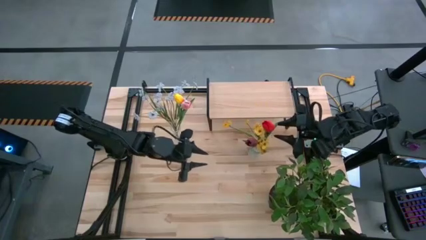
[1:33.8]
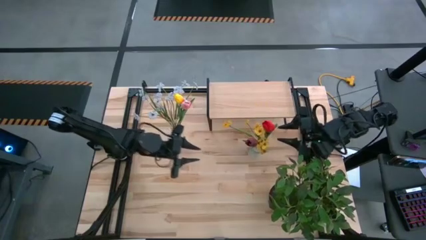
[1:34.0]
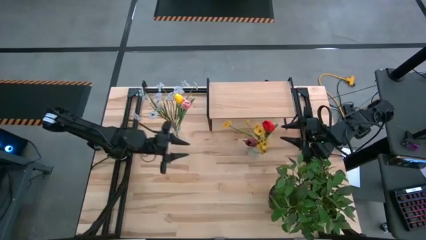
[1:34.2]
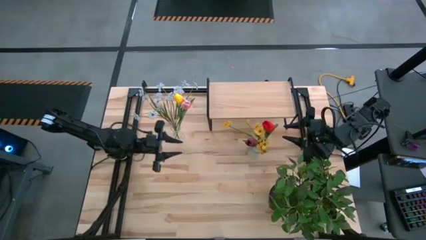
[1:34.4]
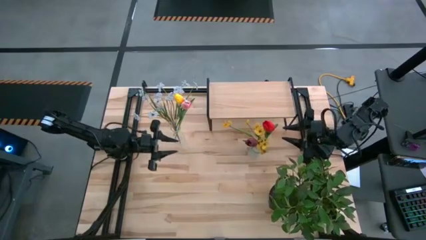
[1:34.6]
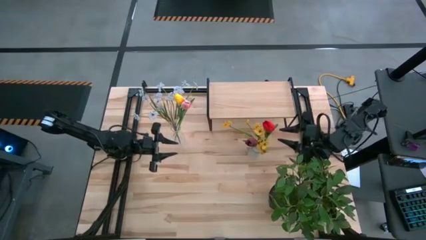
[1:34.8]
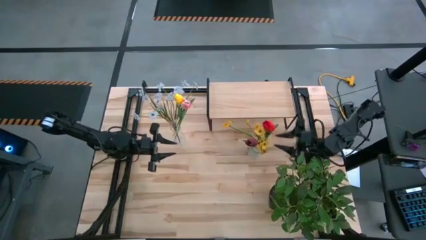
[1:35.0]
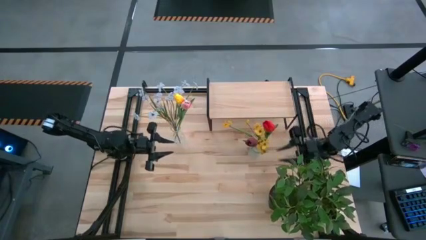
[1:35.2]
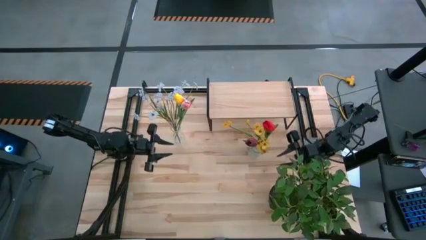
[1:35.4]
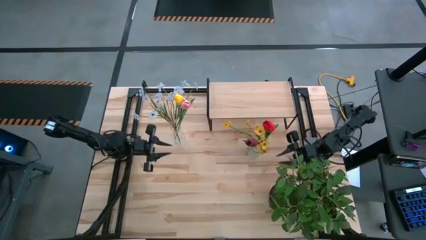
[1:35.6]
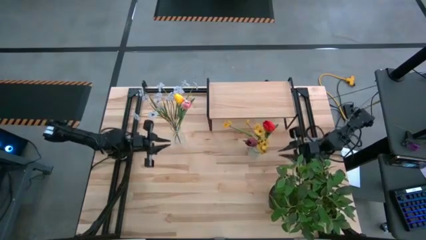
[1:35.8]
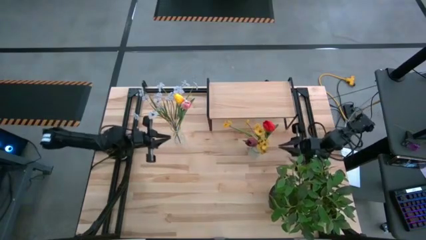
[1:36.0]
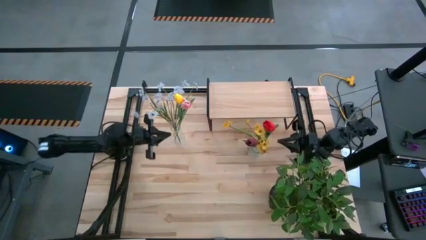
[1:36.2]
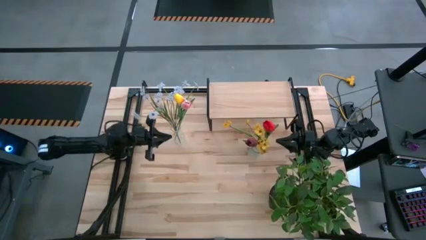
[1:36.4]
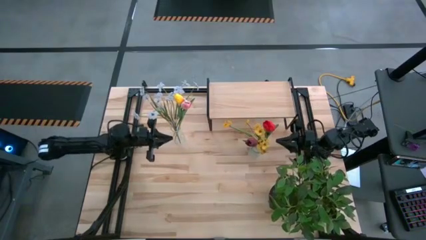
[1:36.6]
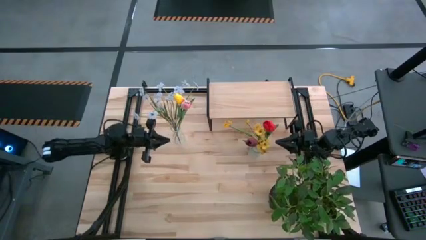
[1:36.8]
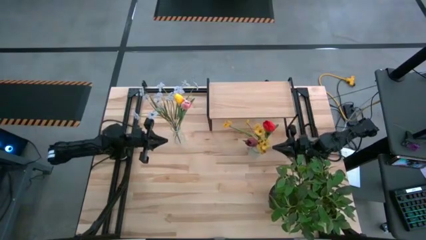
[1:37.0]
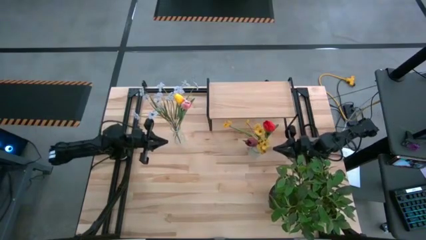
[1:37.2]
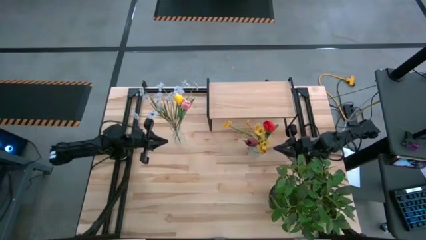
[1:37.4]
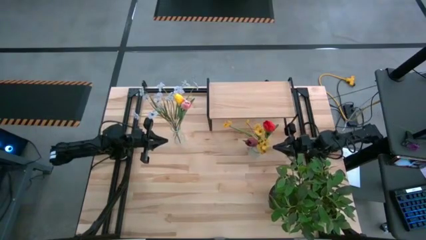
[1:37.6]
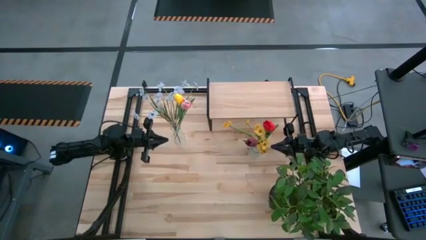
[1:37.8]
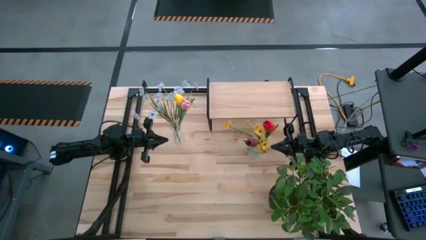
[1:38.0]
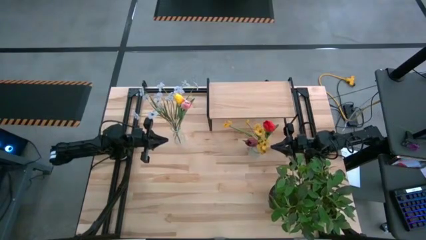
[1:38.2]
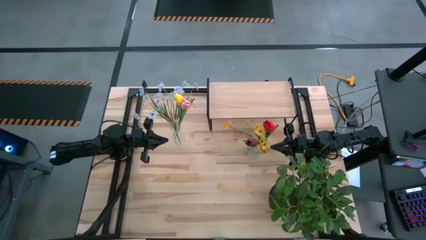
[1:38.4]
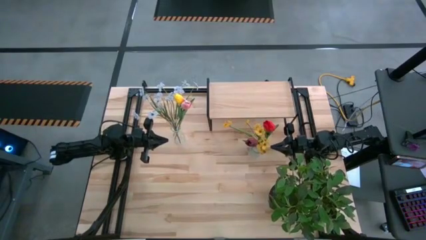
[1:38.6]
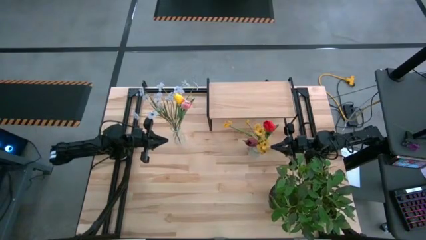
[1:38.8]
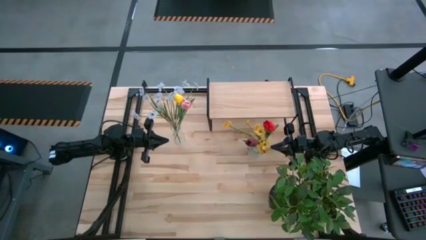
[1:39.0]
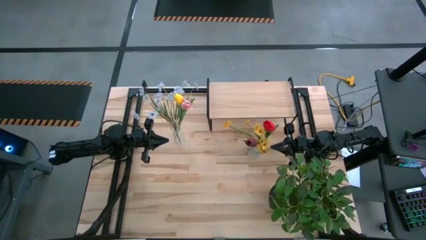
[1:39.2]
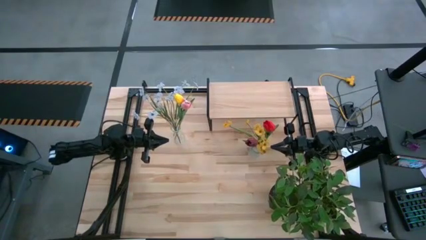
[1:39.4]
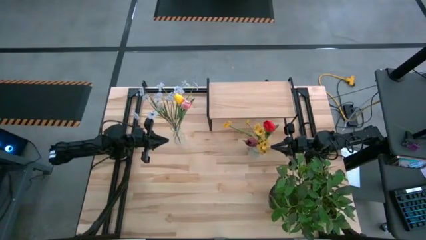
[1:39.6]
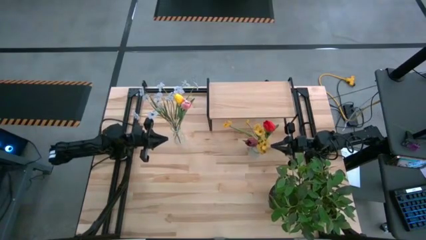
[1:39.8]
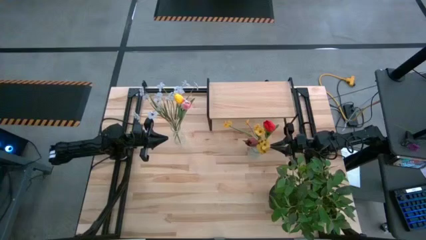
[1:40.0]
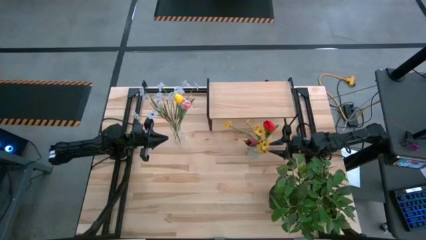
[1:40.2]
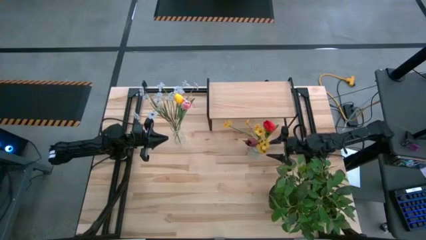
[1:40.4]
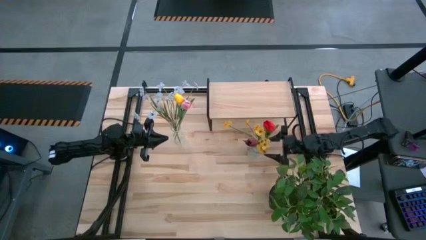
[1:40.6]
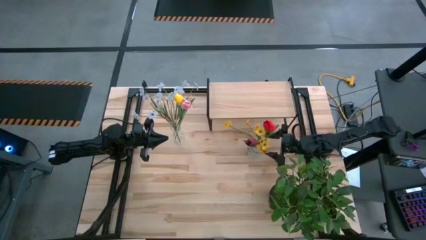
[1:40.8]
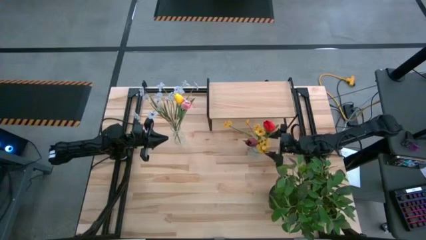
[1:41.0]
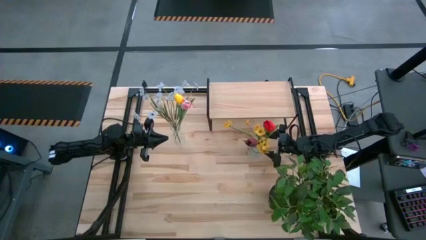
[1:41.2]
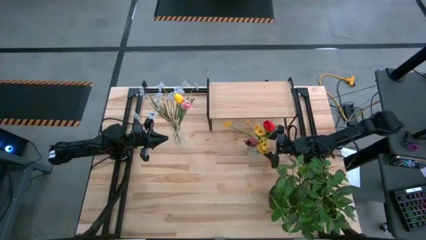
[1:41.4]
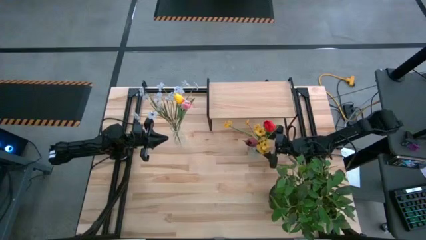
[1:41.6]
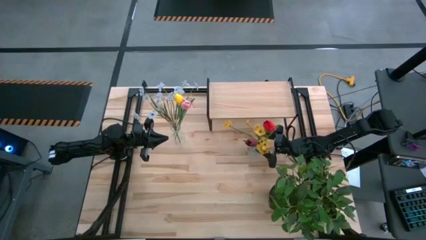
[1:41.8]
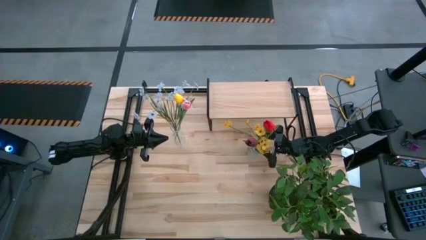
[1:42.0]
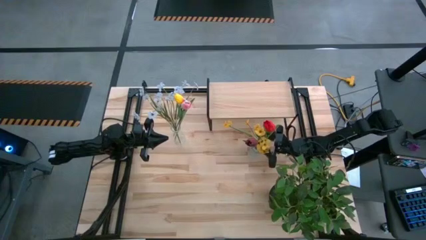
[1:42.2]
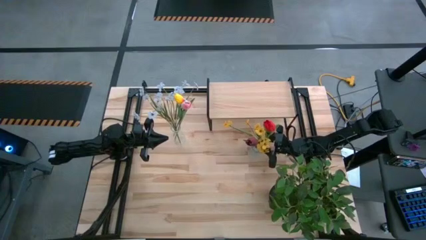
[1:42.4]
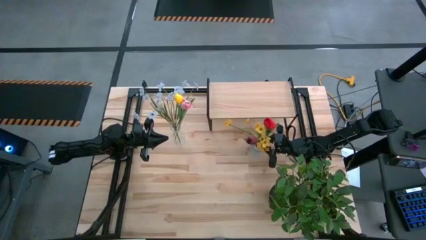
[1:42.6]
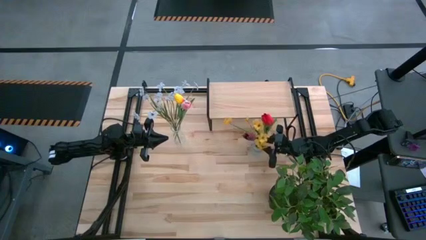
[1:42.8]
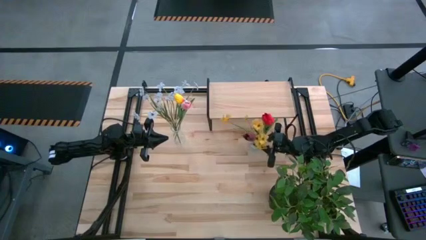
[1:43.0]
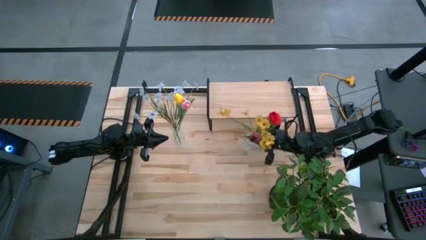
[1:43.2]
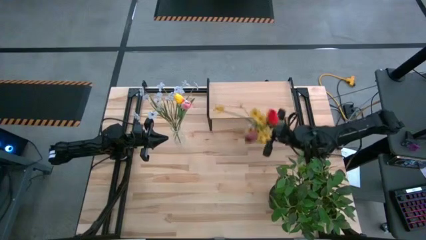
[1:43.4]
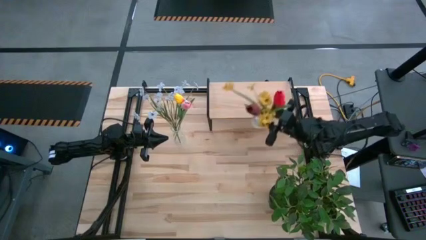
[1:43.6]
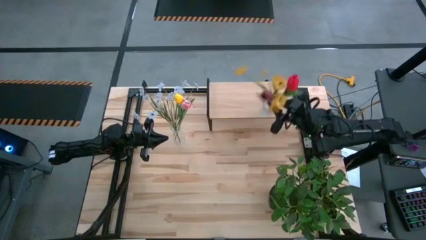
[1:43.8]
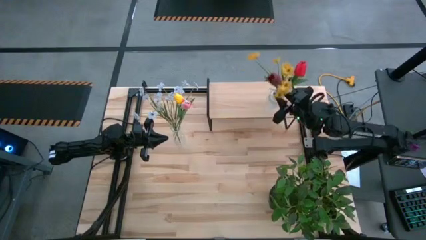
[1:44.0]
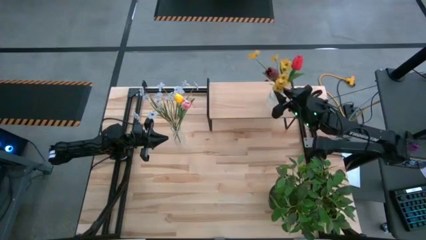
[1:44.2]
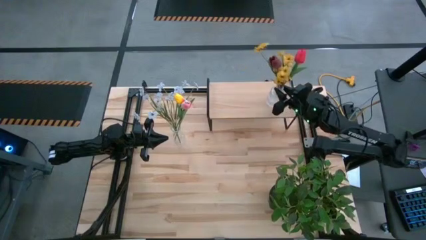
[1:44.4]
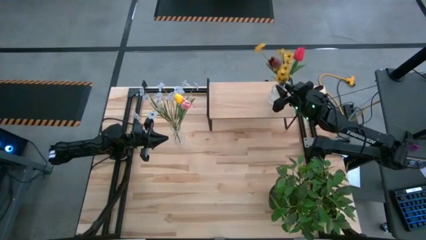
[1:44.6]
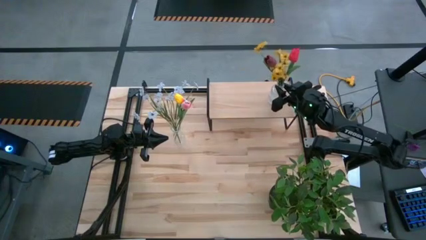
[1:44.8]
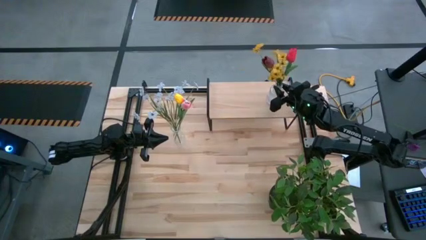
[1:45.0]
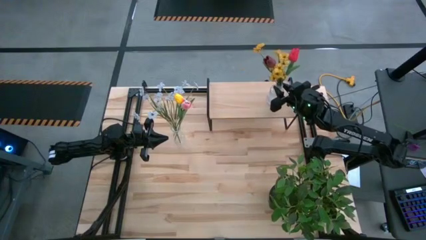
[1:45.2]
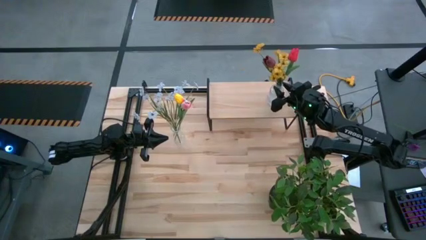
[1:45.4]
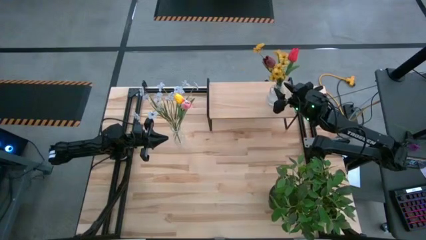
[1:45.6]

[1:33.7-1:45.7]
Task: Pick and place flowers into a vace then onto a shelf
Put the right transparent vase with the flowers on the shelf

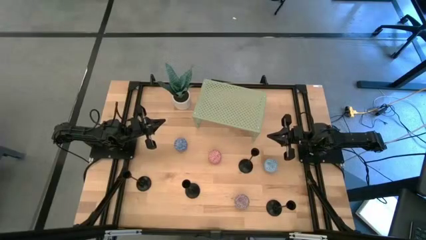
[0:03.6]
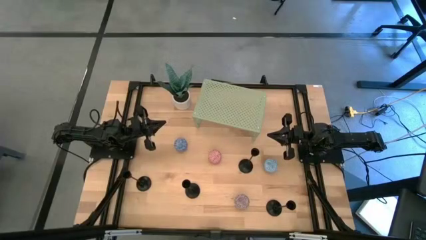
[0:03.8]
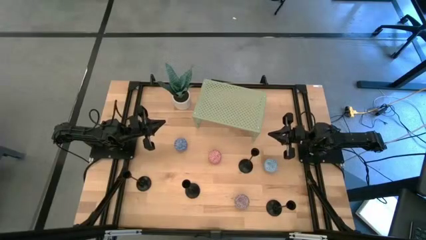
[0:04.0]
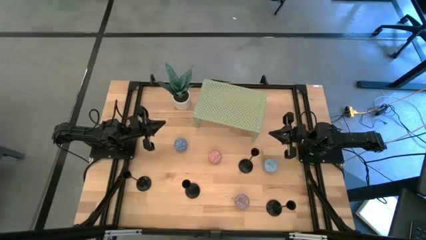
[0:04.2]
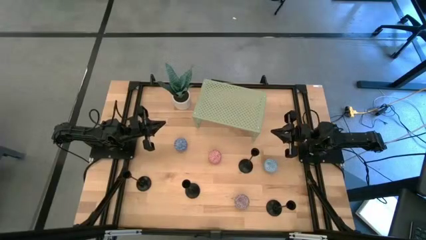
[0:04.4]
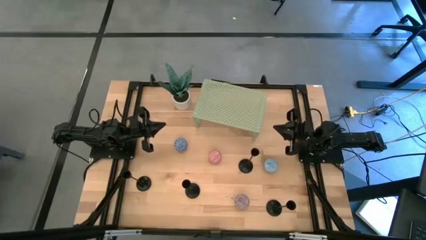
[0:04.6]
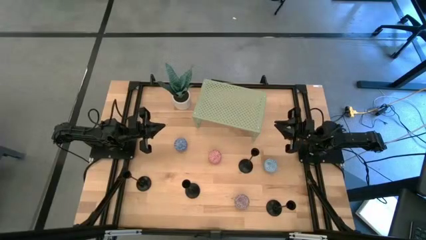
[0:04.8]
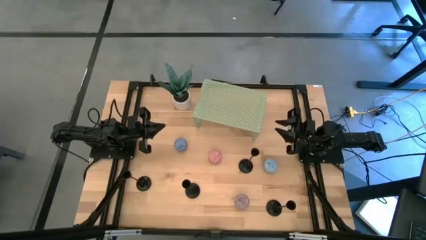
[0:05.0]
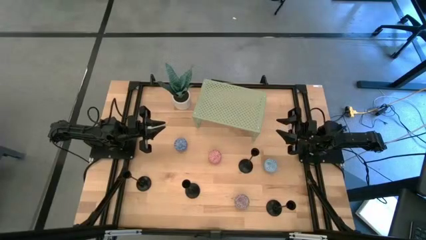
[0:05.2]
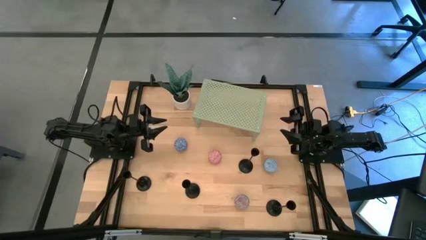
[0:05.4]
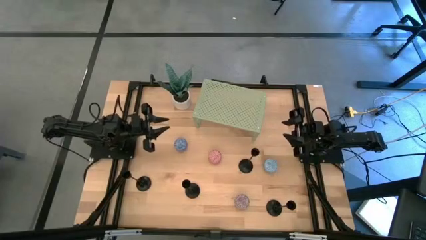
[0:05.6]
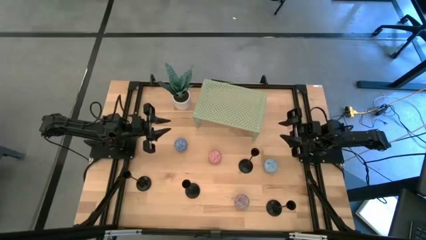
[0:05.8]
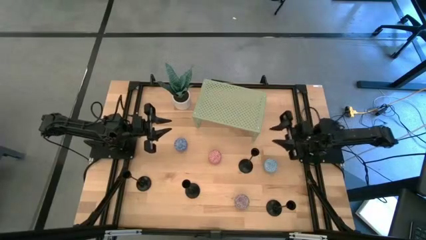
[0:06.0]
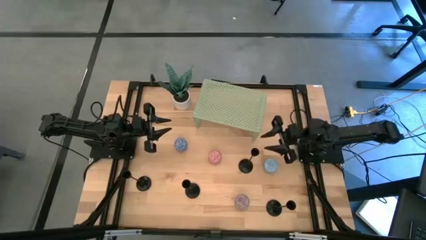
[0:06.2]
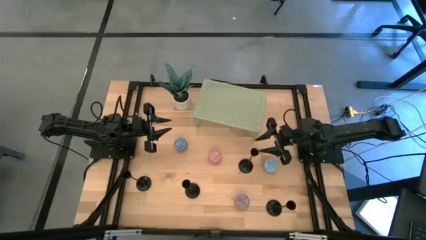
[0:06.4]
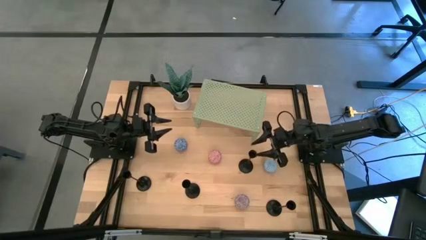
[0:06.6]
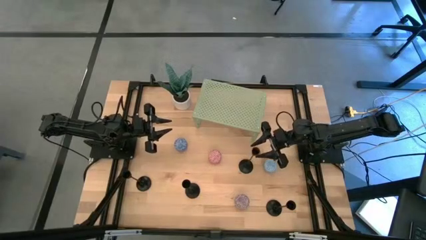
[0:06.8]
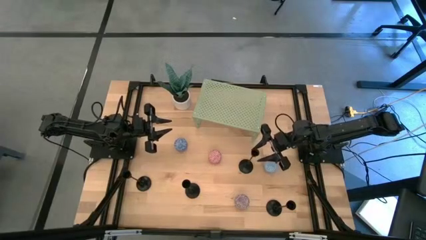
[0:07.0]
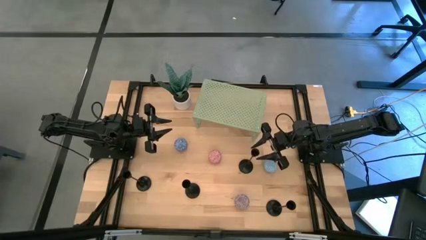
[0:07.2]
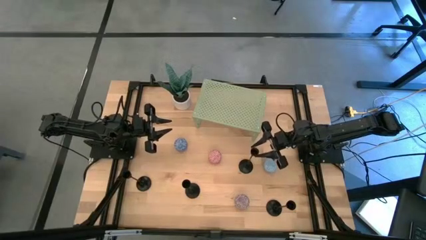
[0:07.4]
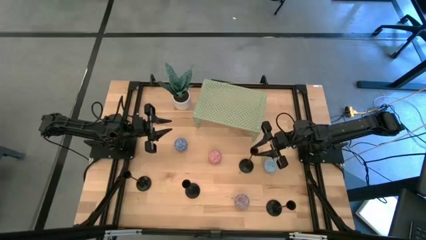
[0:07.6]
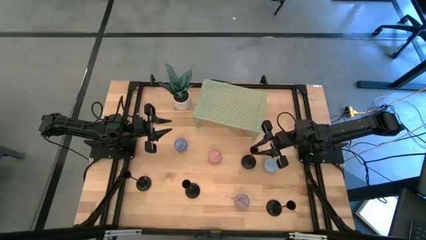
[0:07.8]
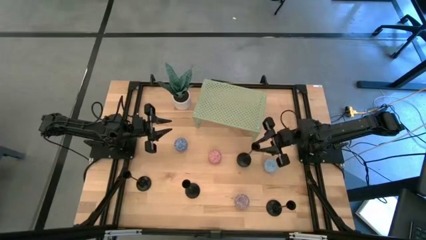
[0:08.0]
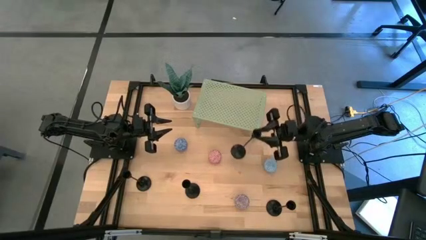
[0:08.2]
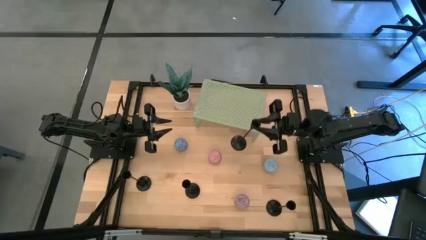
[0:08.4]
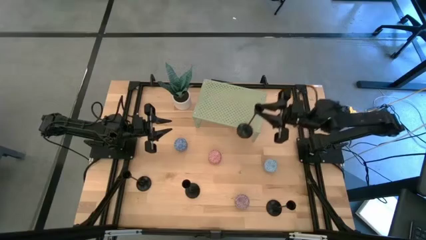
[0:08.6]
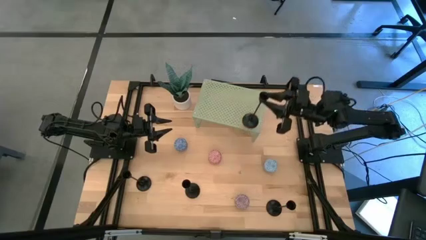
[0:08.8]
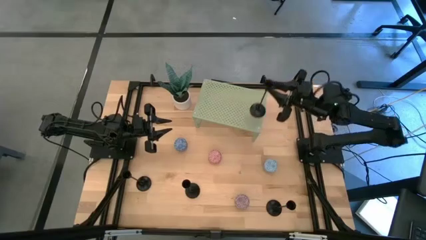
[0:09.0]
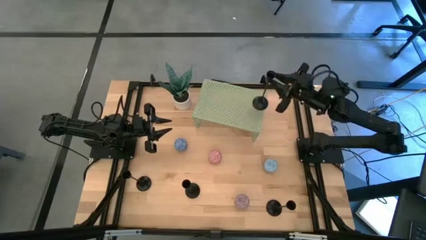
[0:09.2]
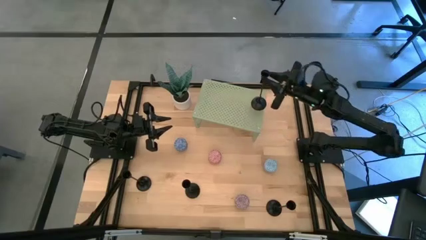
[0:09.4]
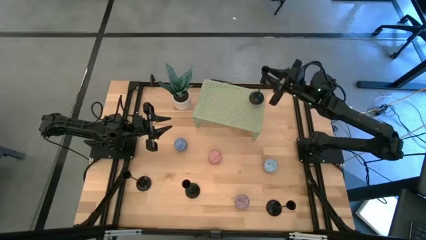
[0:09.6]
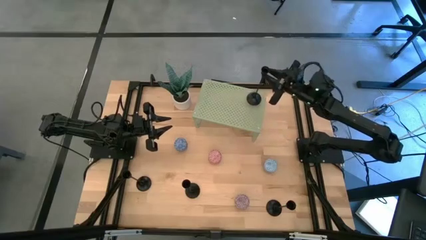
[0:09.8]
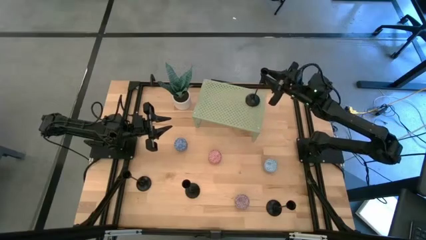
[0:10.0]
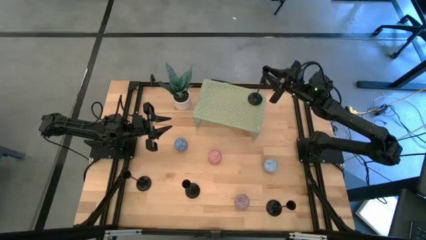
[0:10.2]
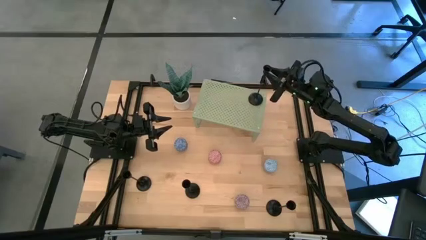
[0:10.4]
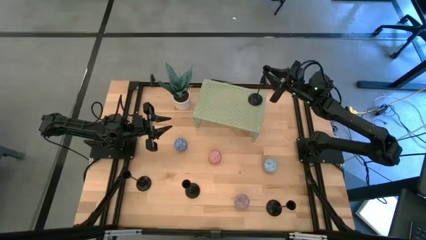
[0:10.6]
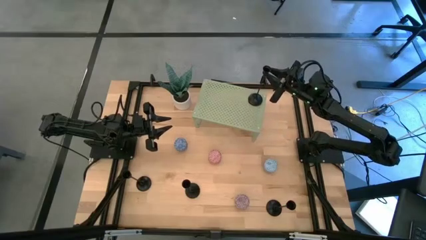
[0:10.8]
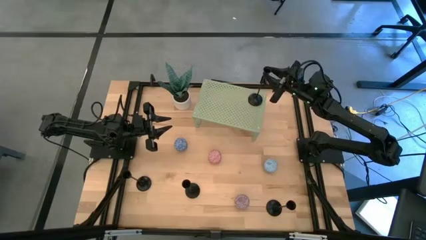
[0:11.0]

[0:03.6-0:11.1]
Task: Pick & Place candle stick holders
Put the black candle holder on the shelf
